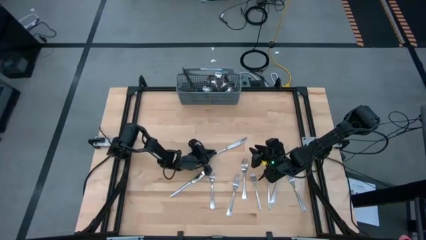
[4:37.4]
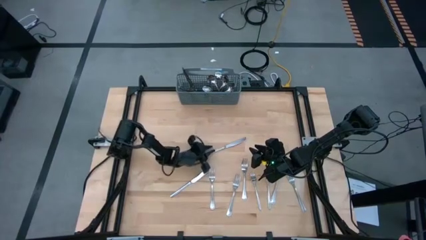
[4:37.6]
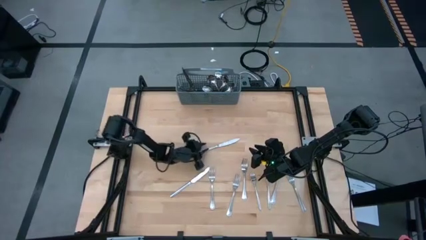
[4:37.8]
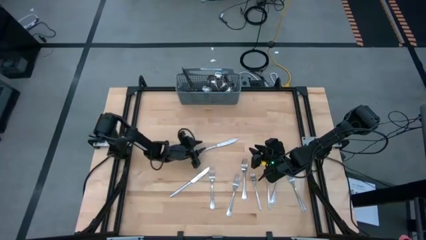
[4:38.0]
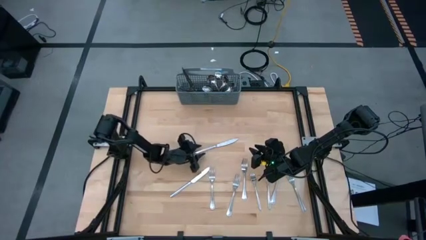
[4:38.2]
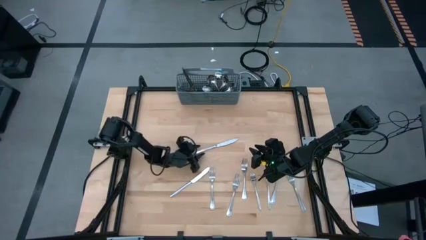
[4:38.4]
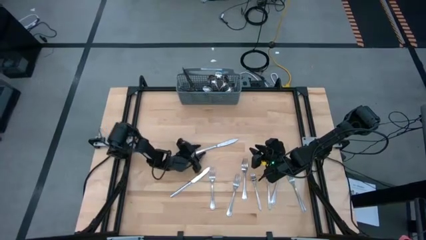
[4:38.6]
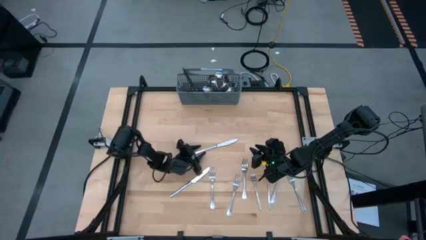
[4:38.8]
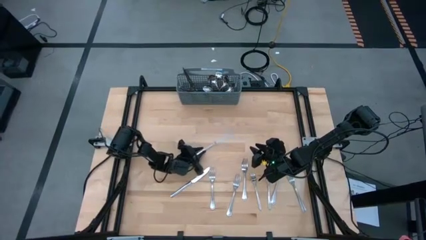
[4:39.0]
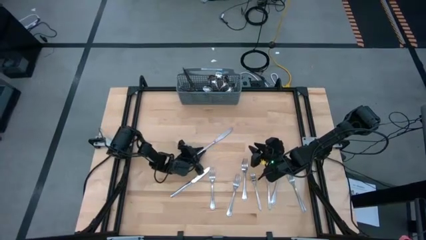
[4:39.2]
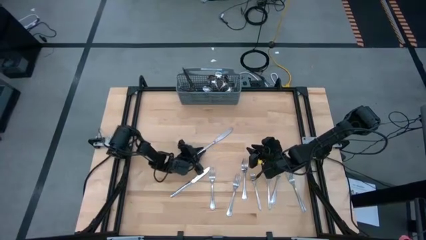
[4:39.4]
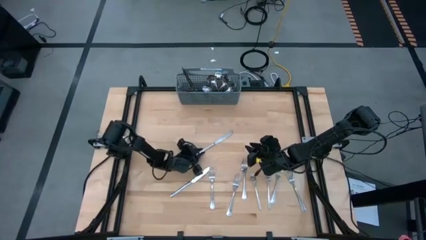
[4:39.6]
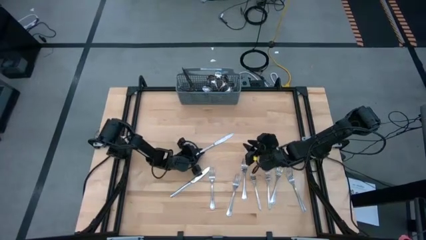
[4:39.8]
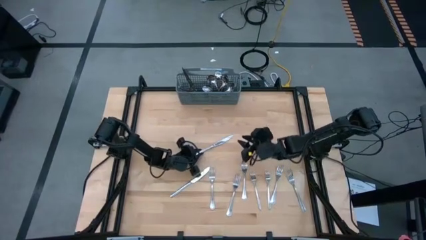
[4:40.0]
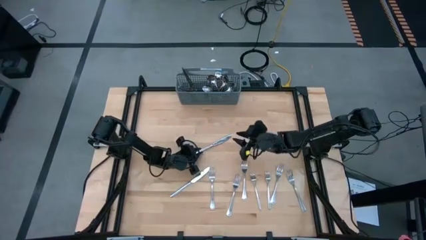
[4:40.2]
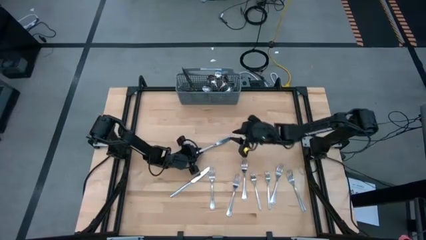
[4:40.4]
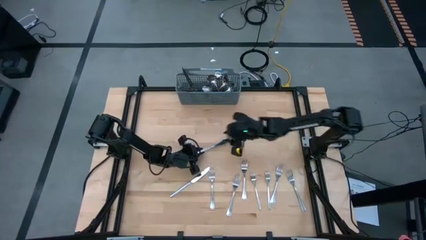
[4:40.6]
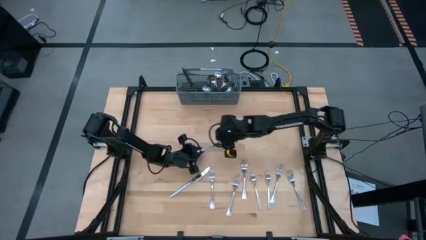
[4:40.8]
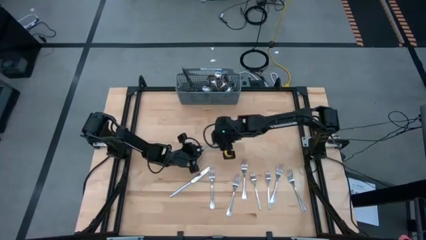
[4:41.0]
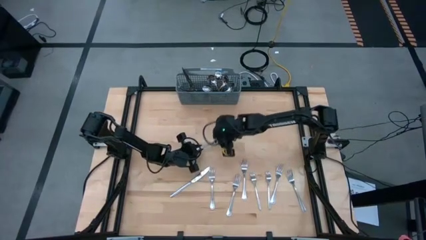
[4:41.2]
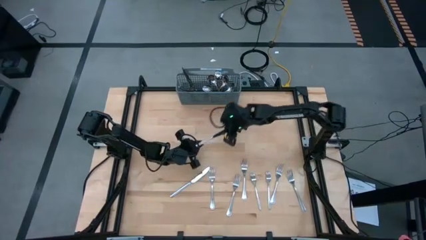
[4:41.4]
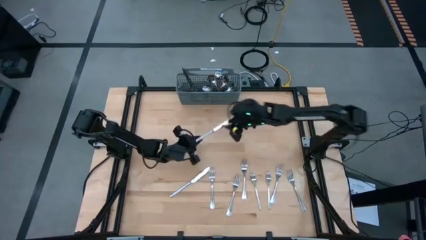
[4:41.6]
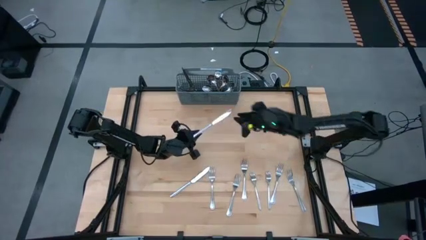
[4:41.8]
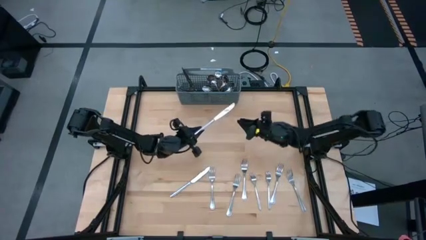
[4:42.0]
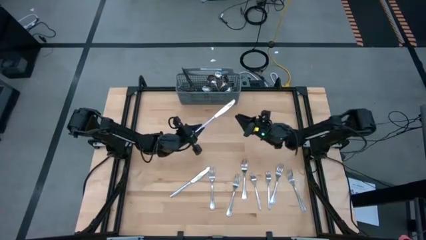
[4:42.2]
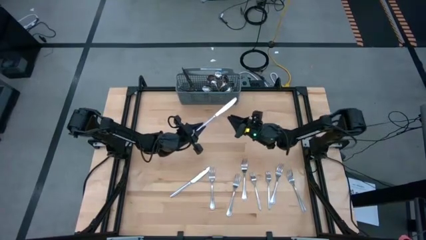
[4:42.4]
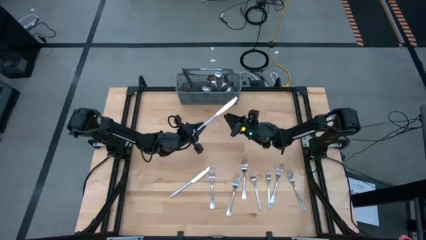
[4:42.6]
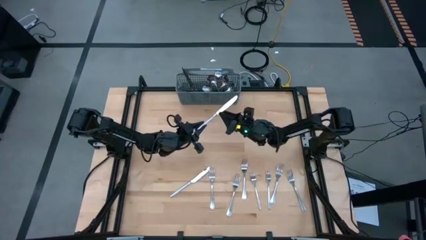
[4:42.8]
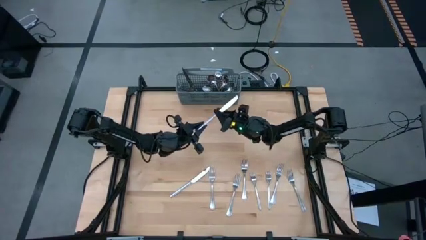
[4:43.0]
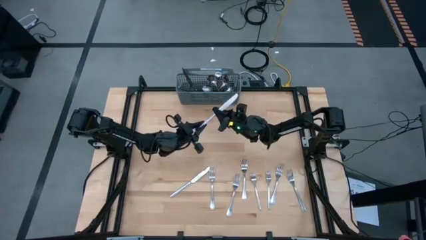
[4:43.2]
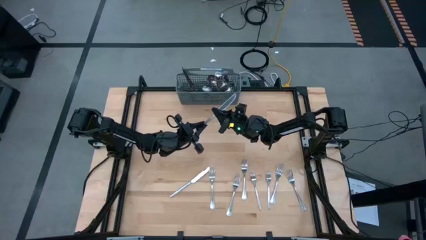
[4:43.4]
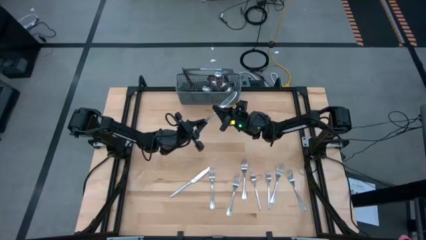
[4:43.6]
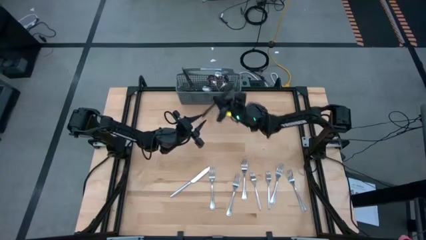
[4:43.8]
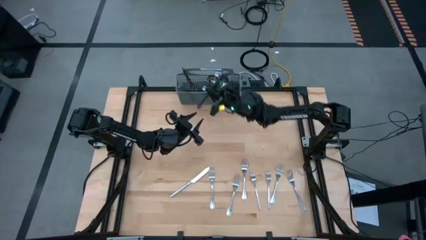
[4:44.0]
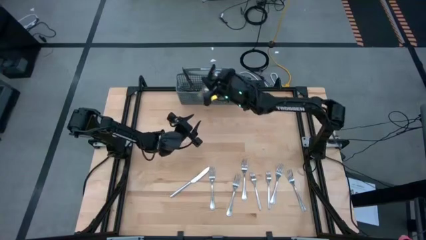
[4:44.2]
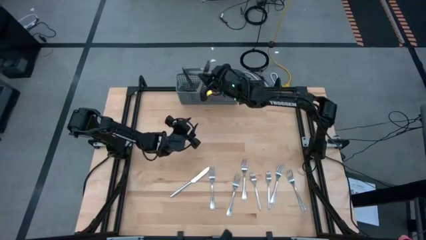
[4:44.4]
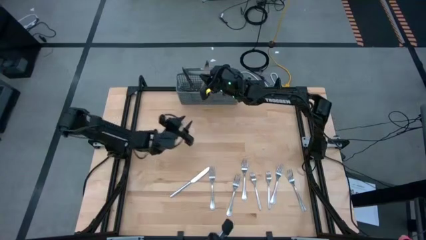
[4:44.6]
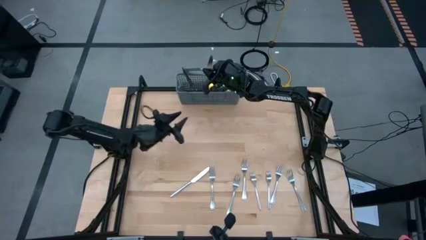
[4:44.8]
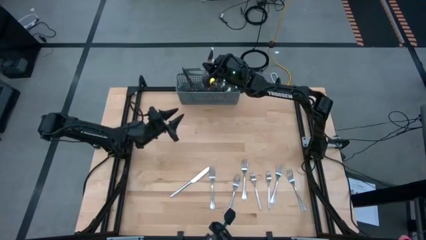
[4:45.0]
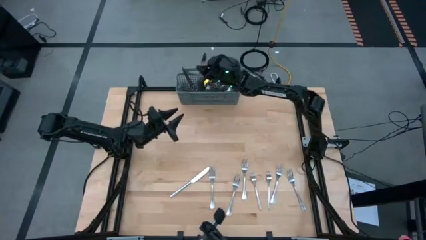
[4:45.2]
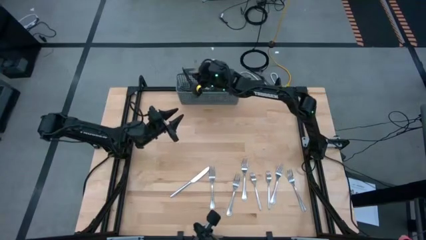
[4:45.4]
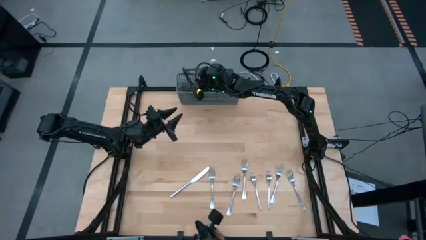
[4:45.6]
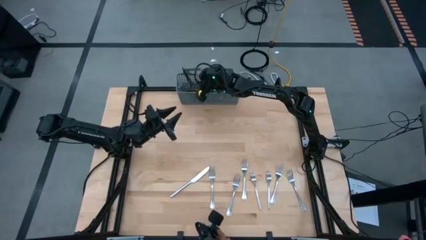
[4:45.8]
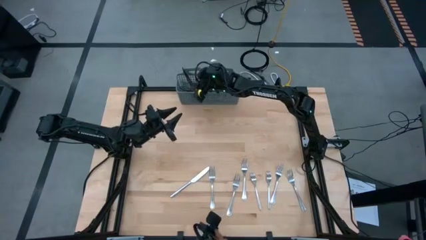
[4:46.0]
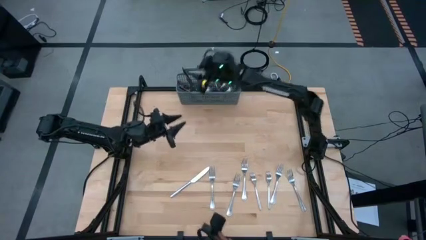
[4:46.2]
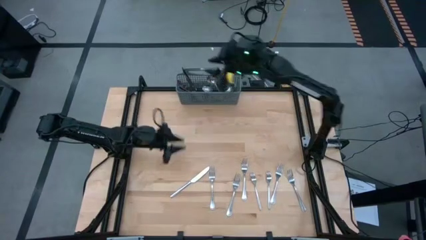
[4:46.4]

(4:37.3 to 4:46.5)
Task: Sort silverware
Put the silver knife into the gray utensil holder

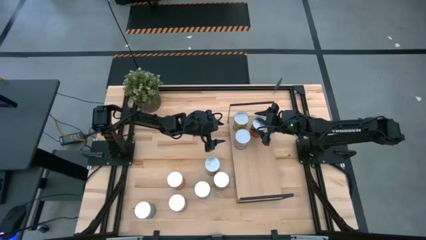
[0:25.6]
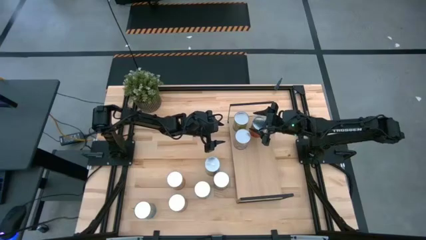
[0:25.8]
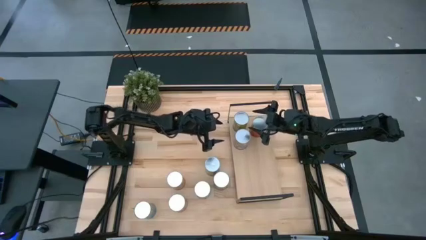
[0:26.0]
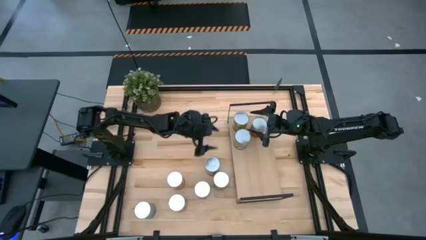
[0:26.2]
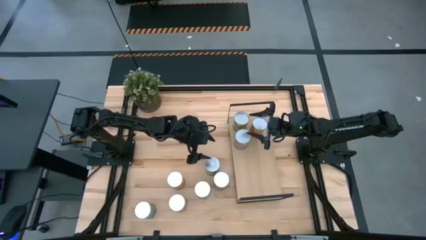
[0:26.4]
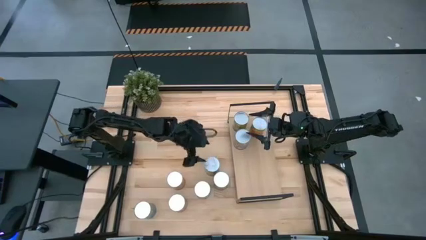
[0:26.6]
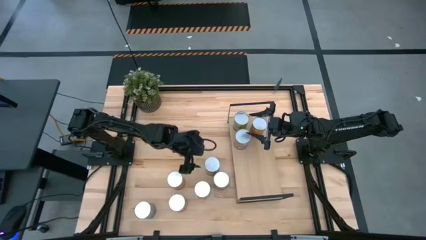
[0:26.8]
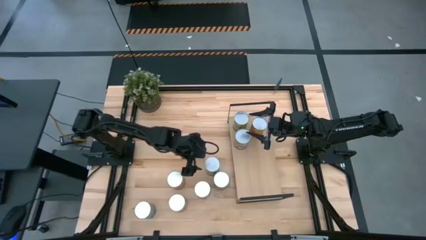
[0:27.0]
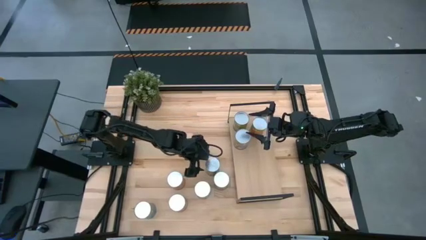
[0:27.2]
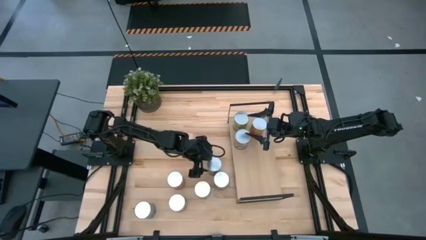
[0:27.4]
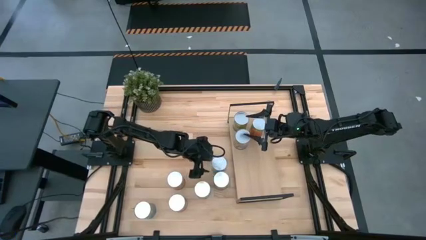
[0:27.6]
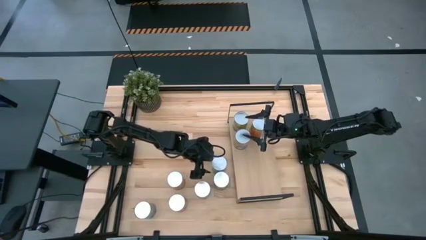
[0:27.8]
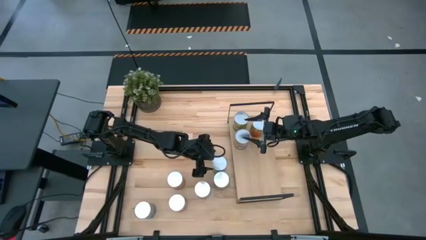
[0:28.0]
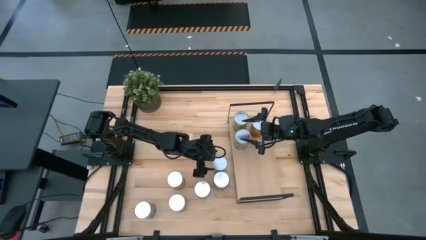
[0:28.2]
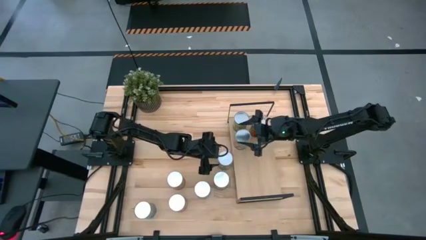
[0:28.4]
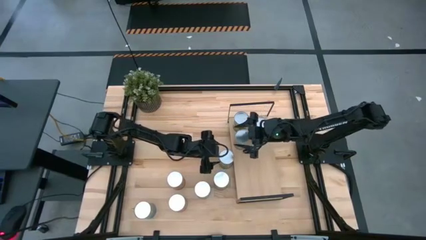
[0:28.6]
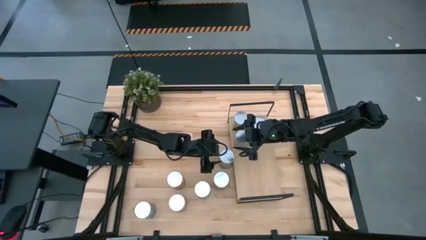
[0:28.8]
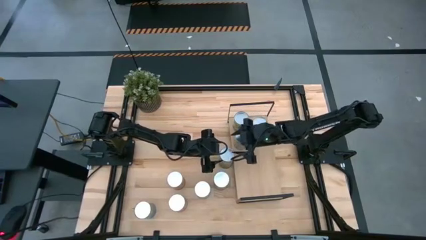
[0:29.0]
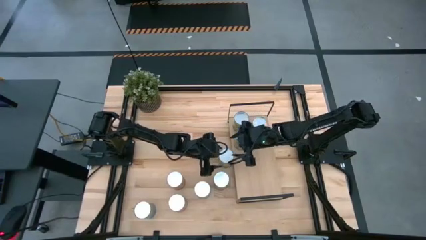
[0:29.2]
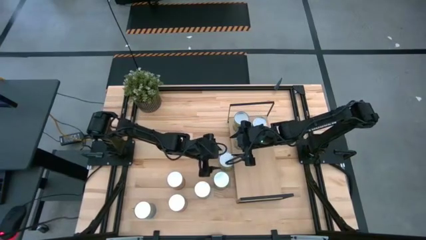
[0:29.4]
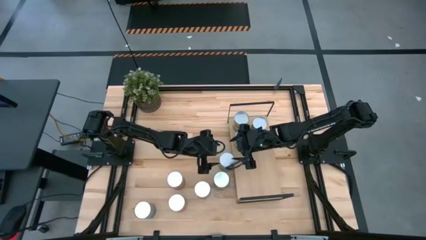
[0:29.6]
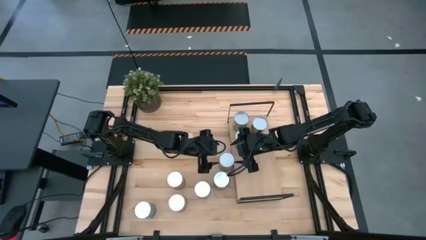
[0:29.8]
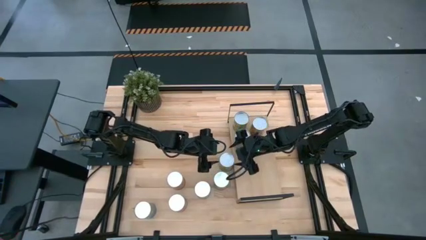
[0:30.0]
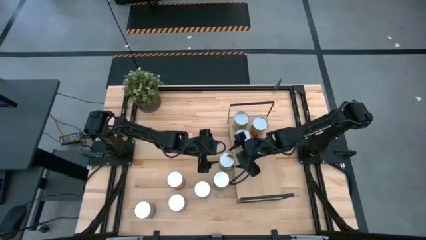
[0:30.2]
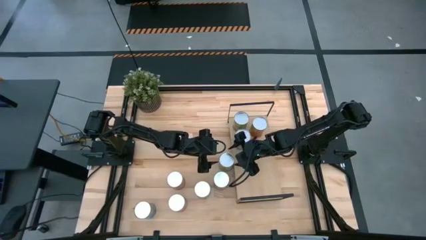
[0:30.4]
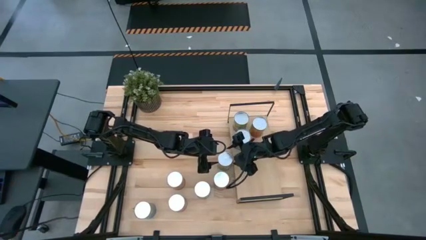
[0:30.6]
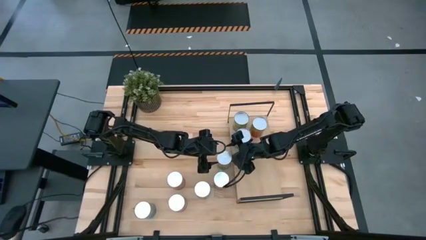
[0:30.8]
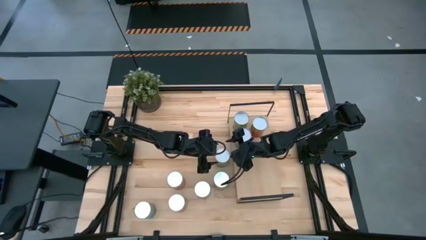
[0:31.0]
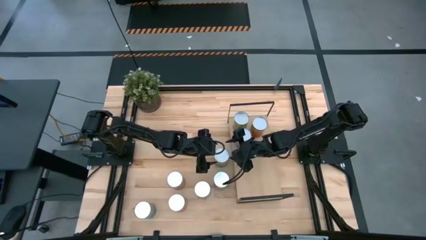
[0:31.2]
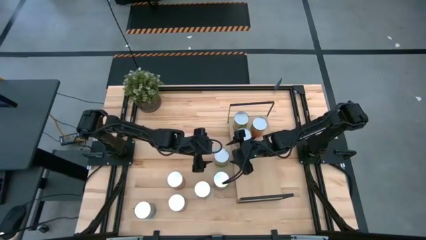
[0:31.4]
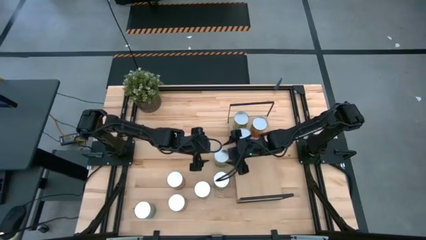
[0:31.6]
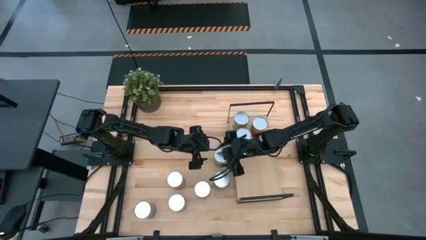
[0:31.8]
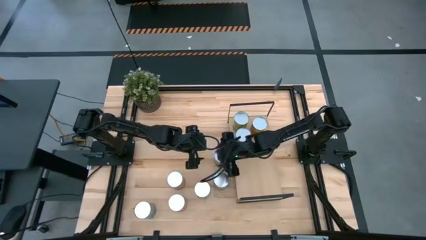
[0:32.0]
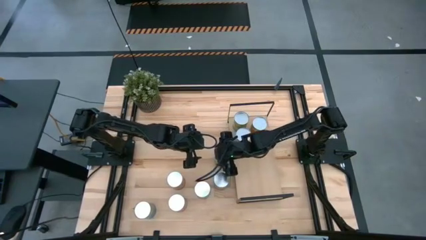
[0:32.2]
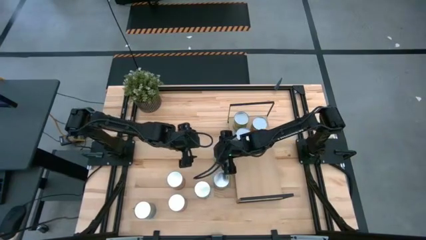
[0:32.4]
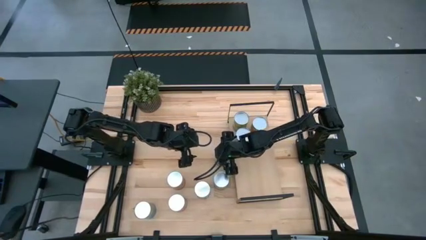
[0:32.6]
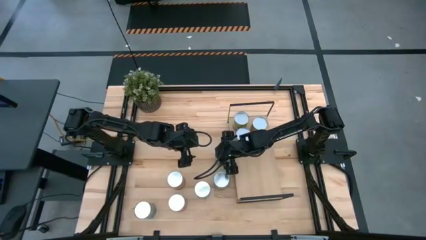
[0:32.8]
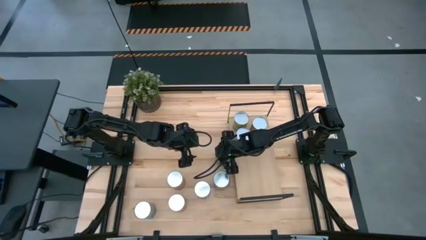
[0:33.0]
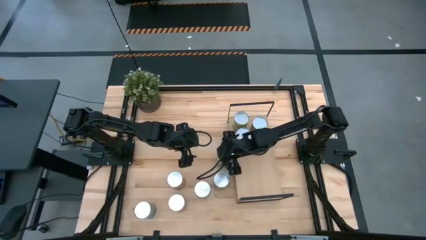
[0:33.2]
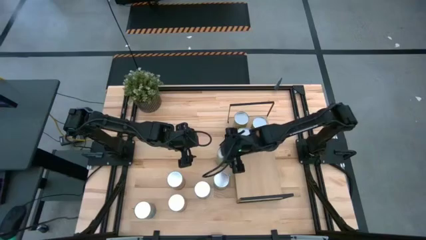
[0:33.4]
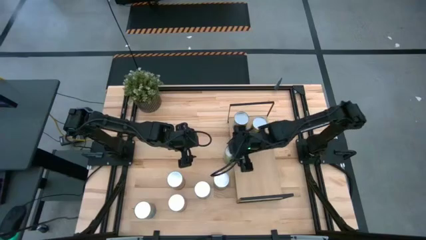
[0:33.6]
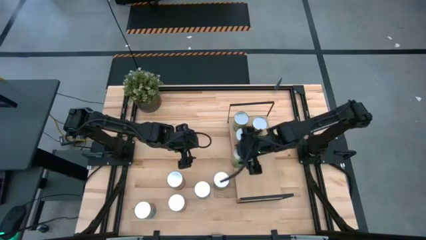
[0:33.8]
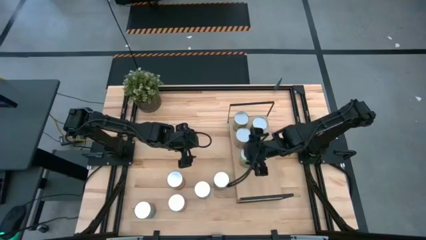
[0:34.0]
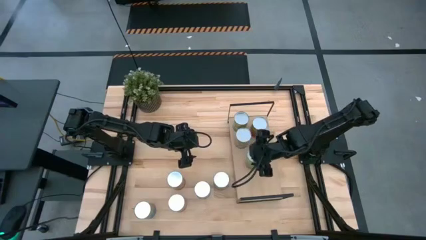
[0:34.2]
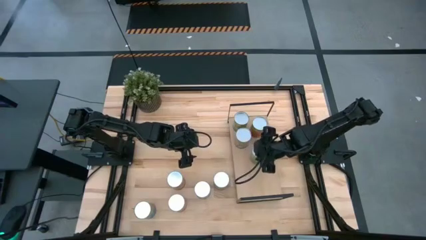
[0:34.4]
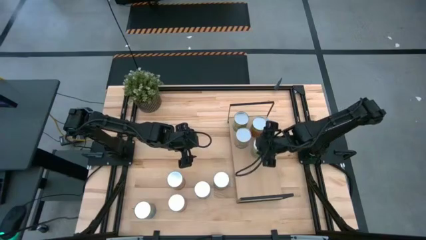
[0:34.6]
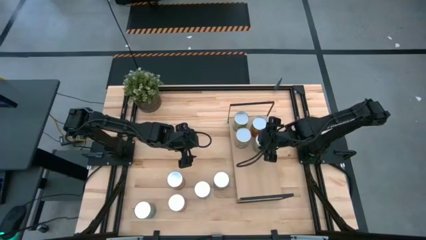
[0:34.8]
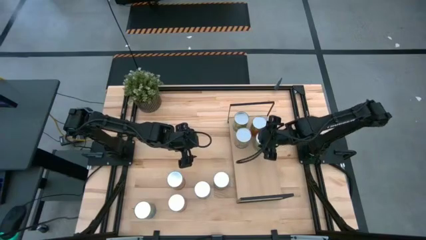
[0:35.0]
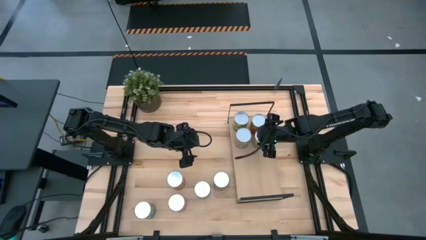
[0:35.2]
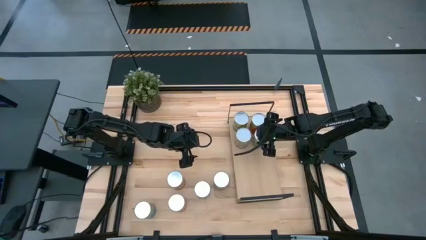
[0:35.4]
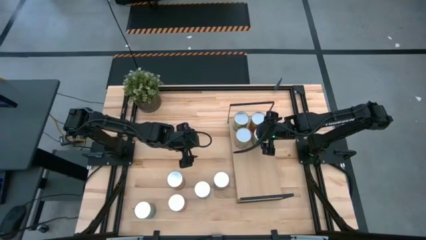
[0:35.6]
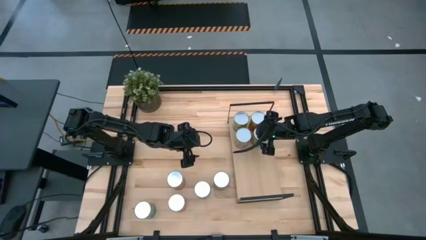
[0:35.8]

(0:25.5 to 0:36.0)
Task: Pick and place cans onto a shelf
Put the top canned oranges on the shelf
